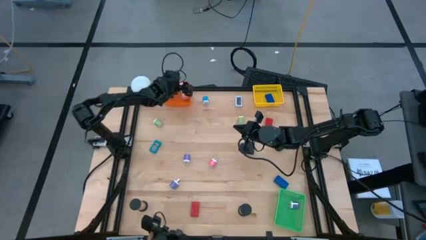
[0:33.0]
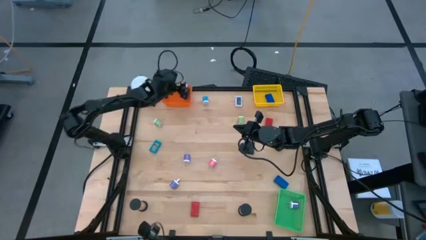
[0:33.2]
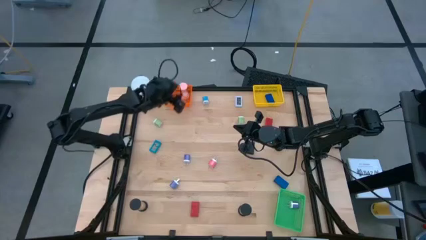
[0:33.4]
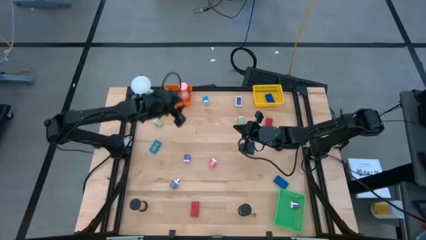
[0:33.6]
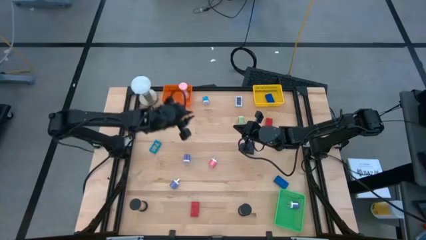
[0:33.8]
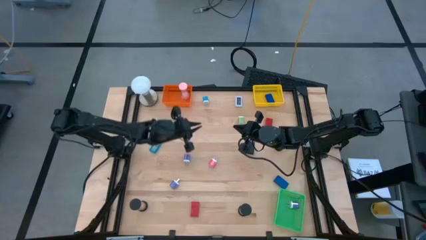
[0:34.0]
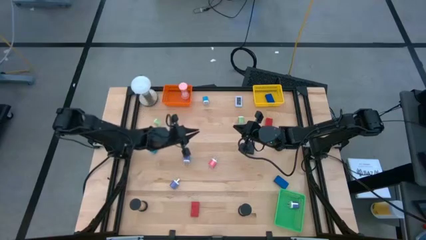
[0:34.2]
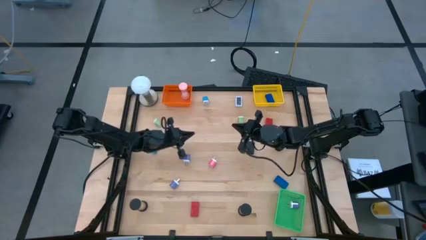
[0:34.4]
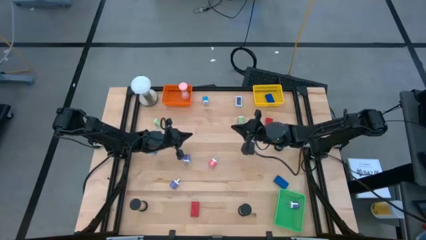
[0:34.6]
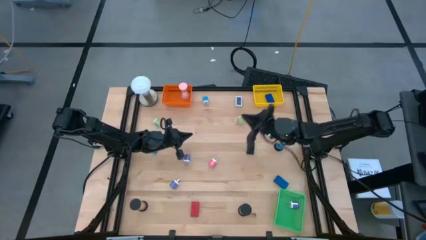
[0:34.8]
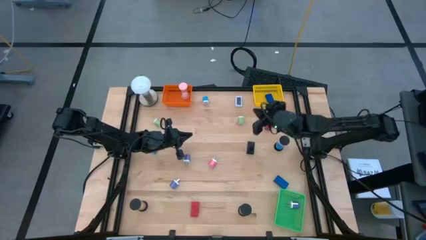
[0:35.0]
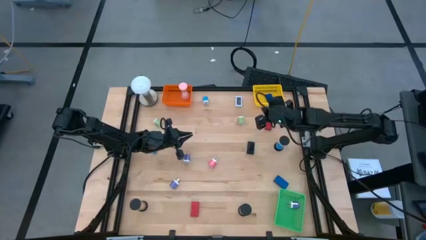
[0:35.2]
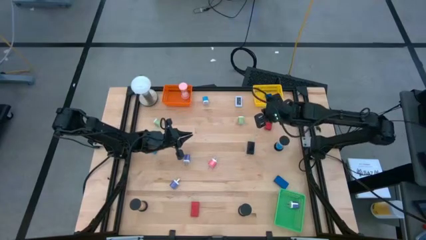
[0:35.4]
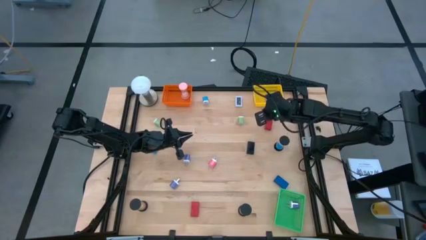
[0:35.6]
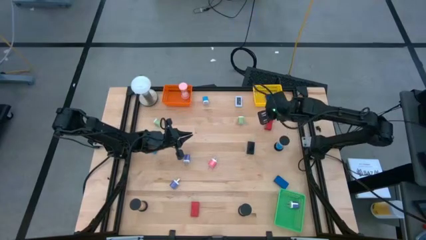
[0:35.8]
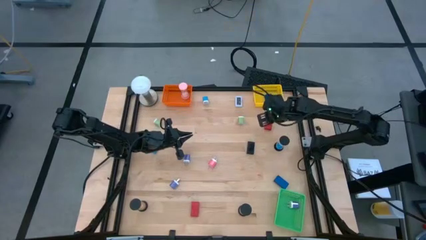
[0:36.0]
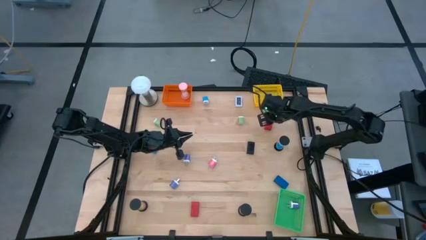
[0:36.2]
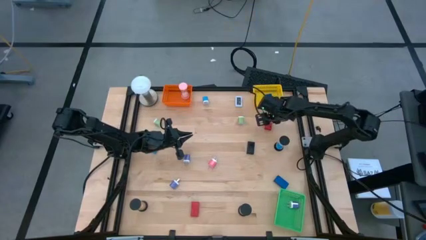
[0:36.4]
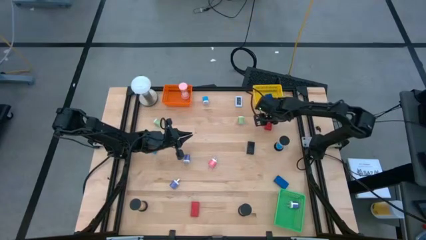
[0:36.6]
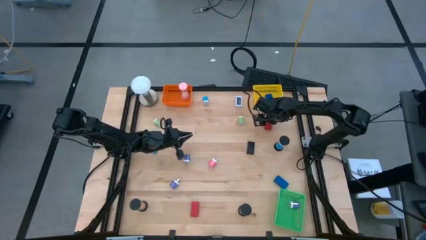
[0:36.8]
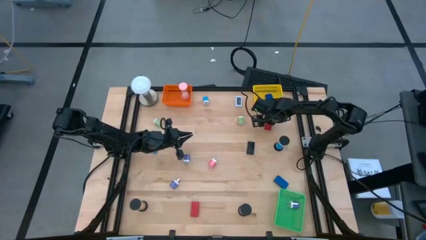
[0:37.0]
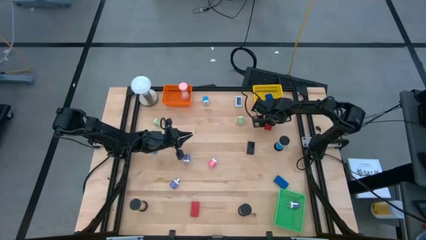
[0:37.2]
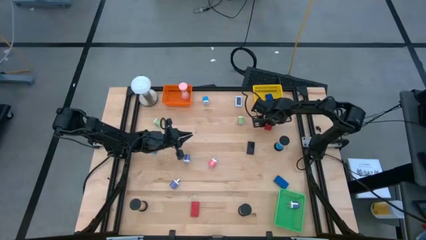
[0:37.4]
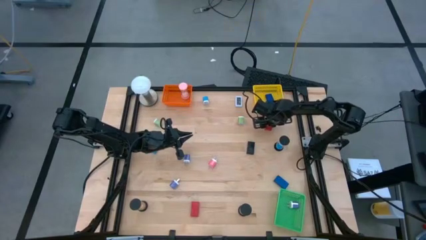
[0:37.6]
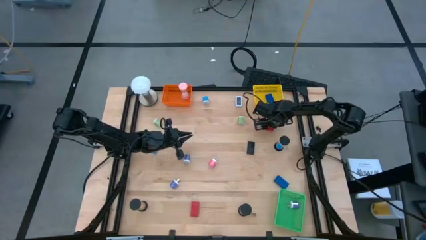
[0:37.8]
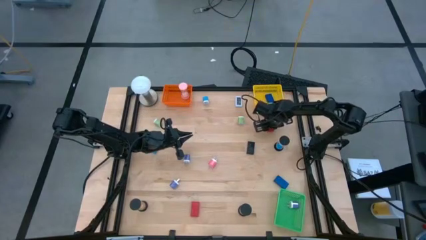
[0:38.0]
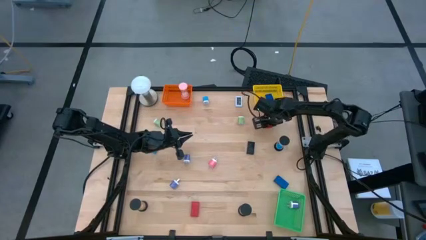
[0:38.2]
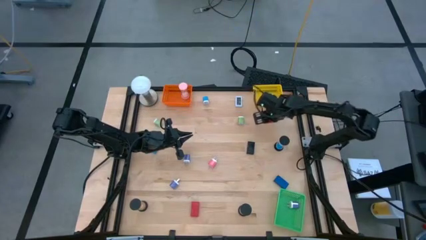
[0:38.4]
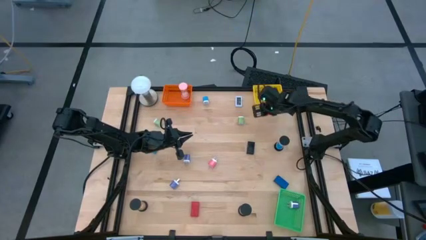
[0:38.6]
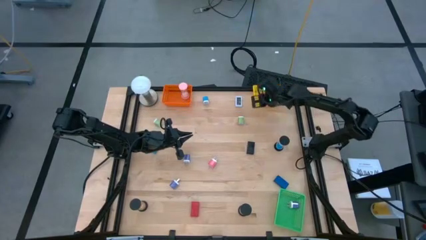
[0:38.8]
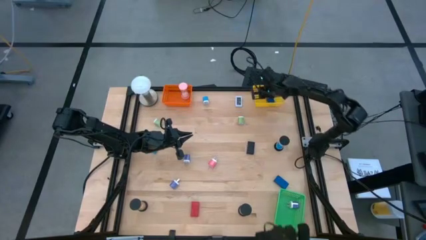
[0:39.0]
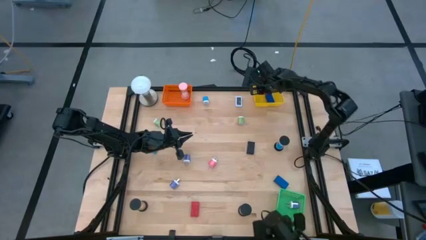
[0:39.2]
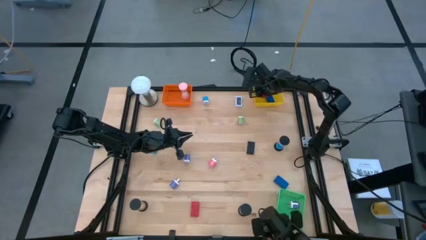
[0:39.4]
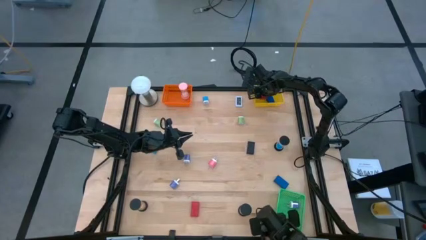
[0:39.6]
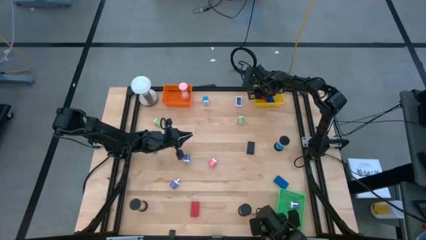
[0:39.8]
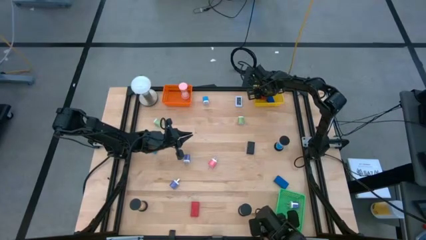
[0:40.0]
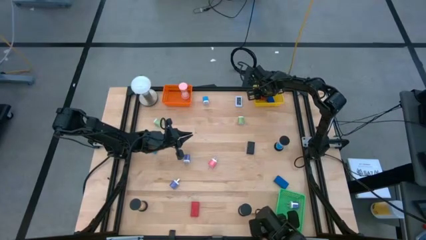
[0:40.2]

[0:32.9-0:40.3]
Task: Pick & Place Office items
Put the top red timer into the yellow basket

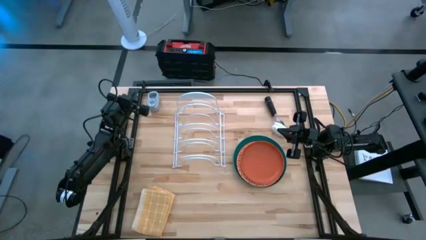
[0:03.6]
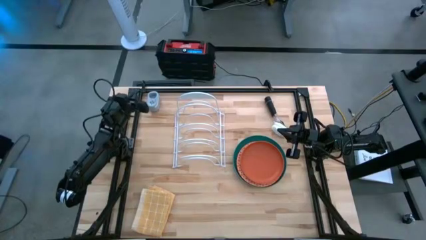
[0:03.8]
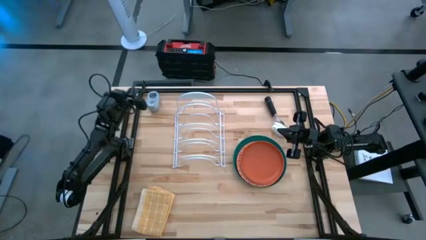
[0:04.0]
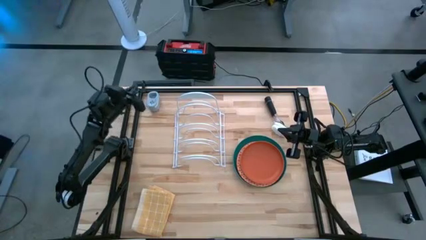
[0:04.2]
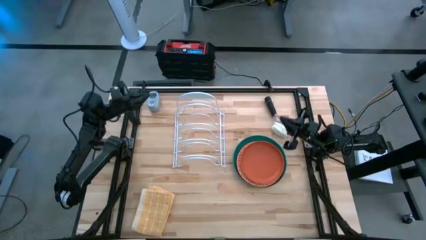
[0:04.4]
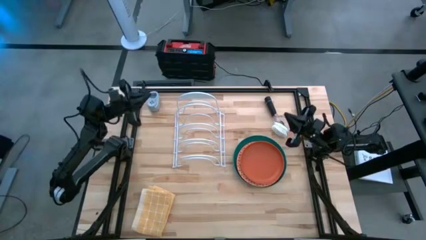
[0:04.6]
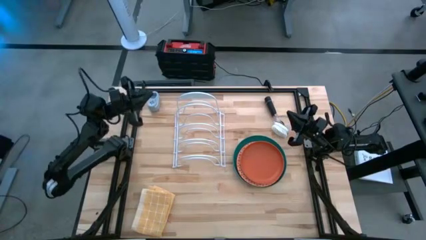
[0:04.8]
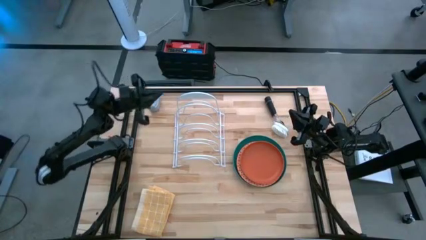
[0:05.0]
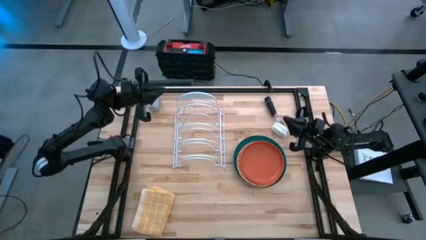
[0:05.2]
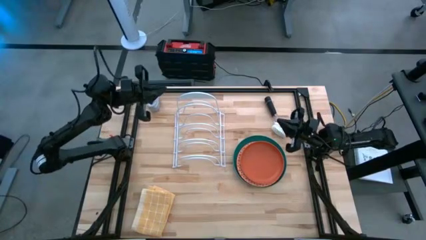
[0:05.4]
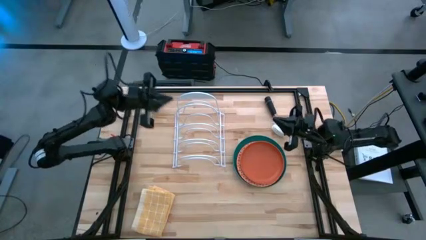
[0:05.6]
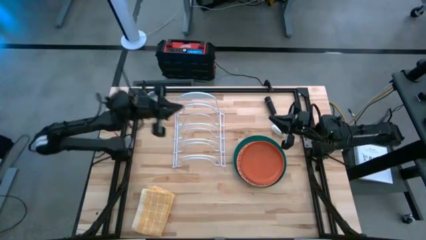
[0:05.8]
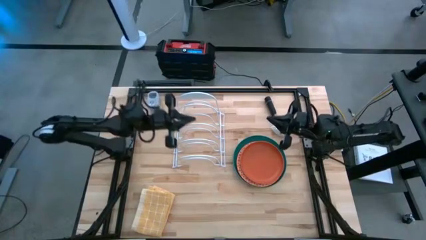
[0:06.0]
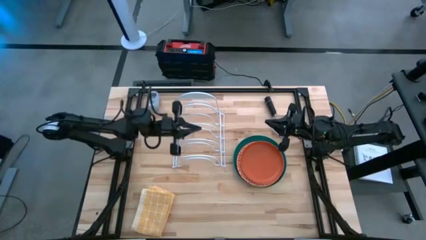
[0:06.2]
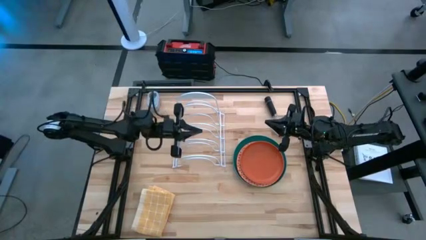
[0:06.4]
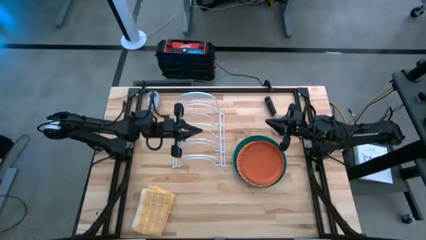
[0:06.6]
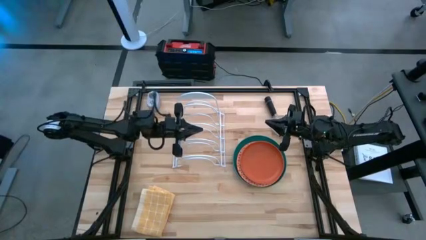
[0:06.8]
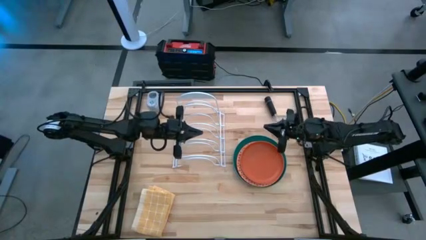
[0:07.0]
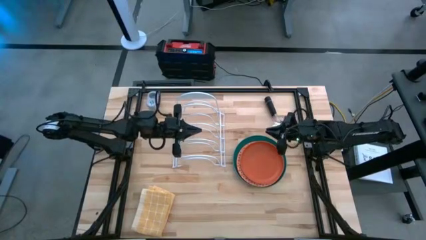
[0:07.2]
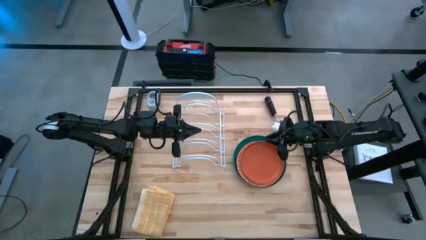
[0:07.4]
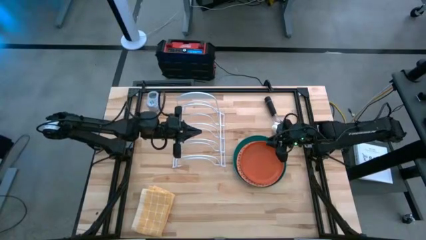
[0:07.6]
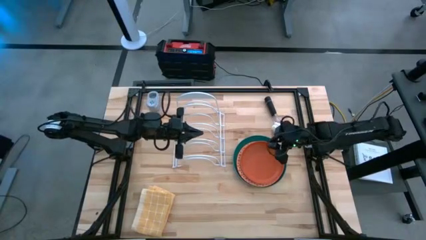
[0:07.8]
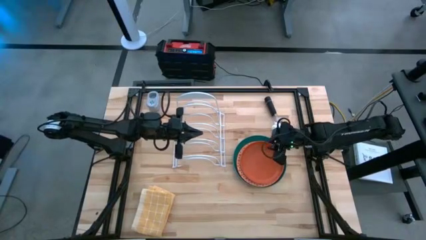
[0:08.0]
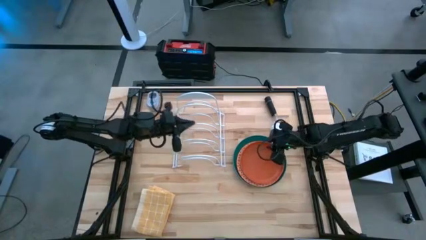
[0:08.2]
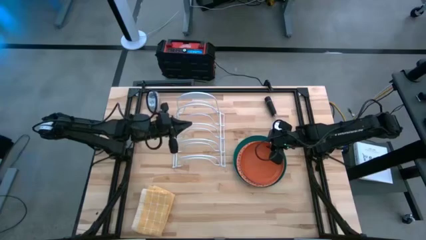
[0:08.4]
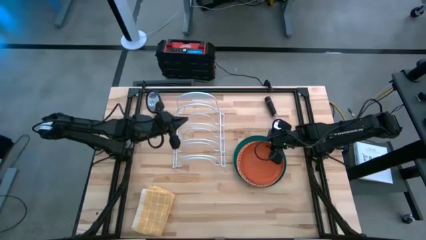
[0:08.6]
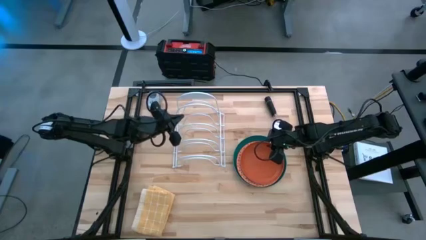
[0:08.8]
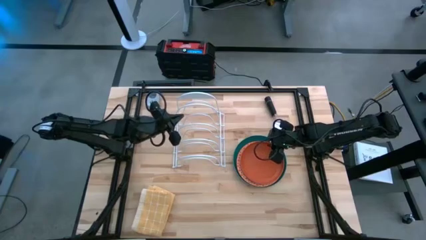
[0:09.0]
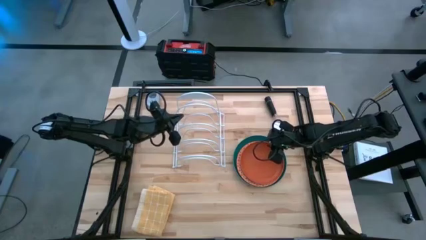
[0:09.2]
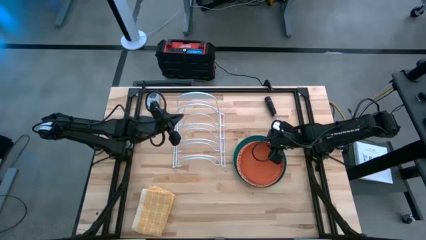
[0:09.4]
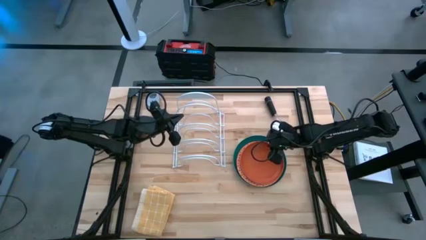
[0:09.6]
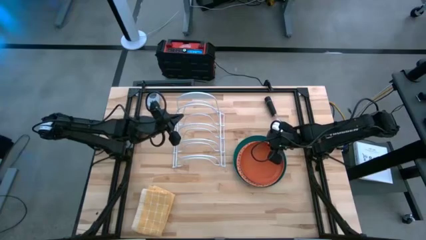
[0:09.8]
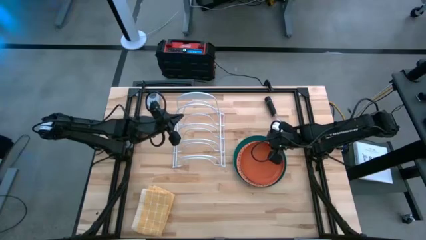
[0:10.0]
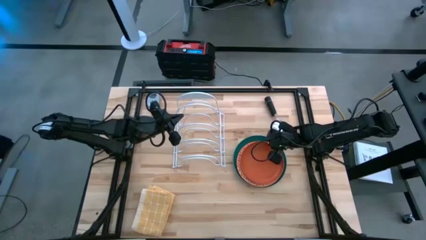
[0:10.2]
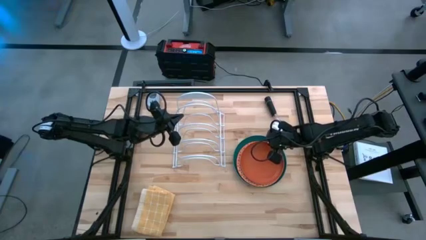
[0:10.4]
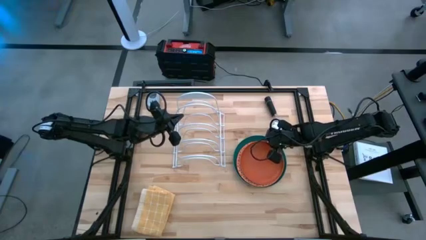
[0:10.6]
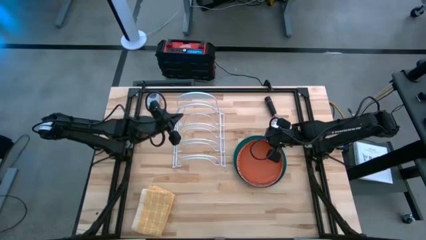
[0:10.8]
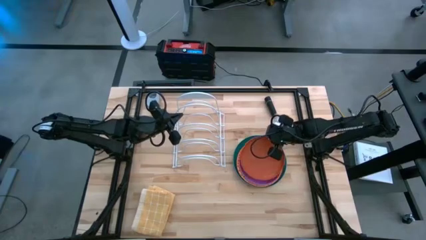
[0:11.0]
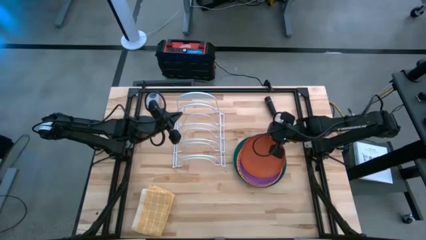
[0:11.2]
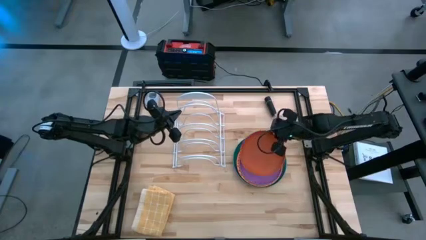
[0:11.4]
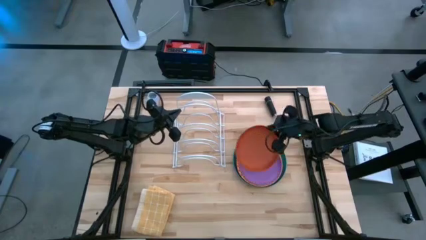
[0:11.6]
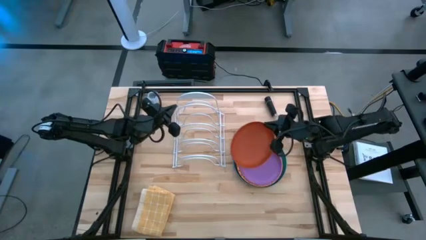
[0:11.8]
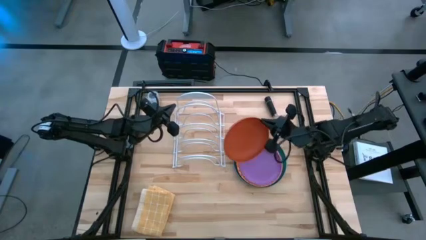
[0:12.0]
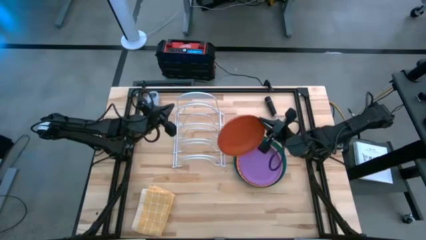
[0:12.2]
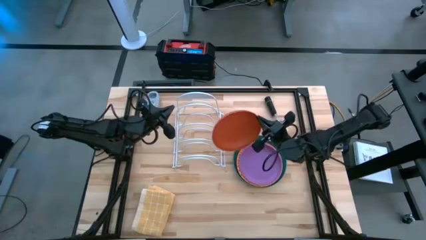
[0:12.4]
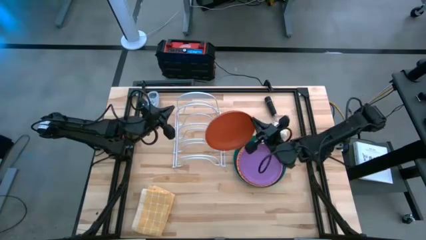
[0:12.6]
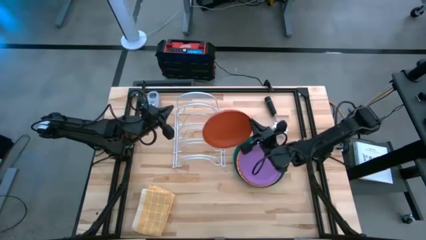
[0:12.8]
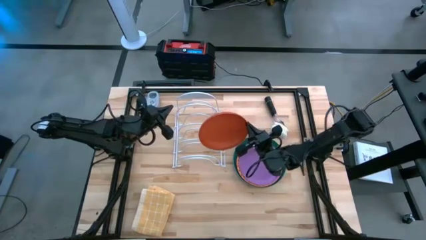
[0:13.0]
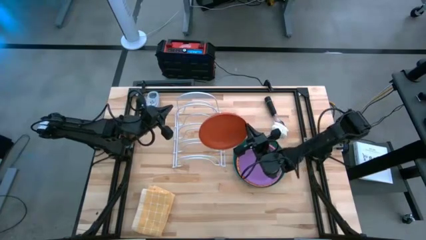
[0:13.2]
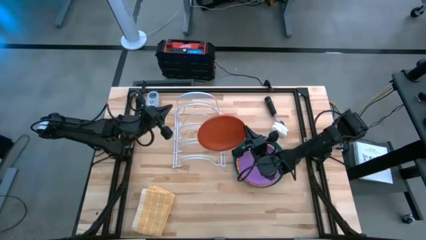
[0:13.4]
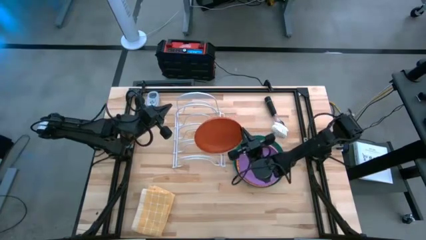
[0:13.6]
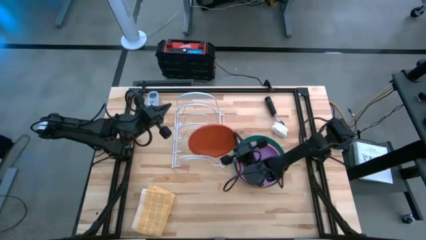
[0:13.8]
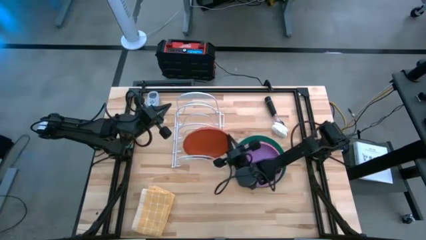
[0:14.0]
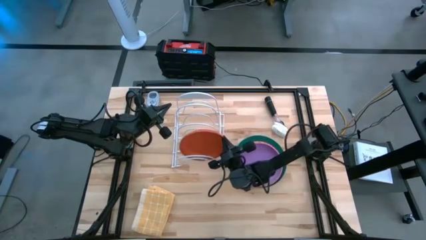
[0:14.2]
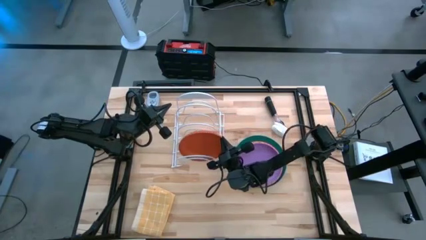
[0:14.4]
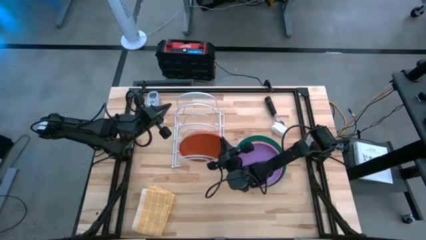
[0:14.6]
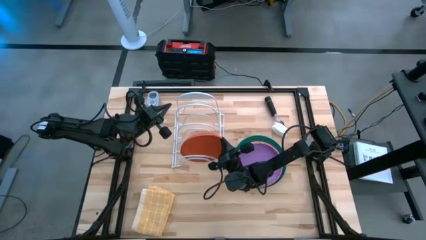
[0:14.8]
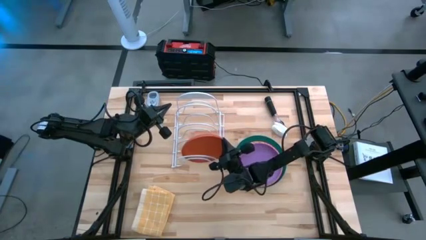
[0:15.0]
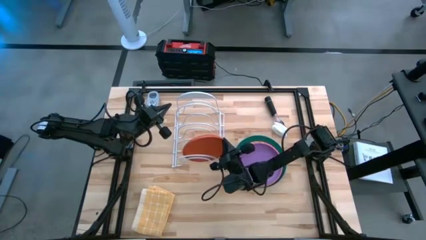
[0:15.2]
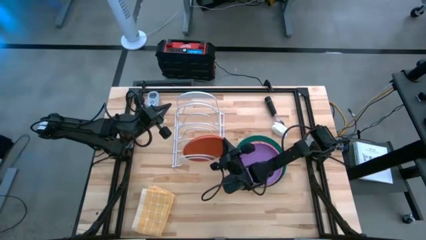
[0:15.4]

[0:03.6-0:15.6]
Task: Sort dishes
Put the orange plate into the dish rack
